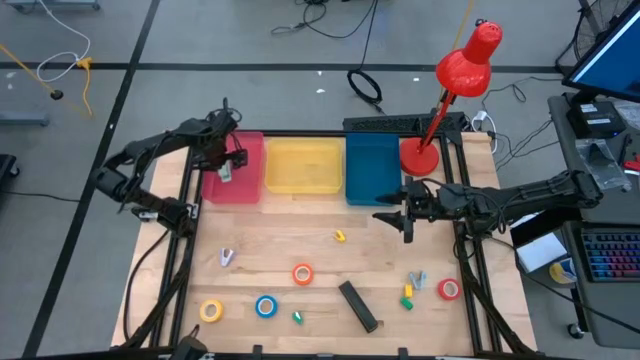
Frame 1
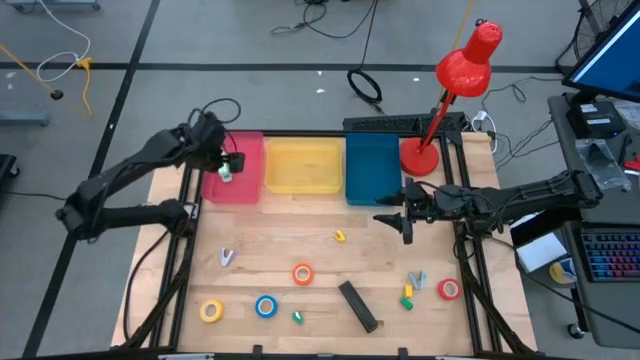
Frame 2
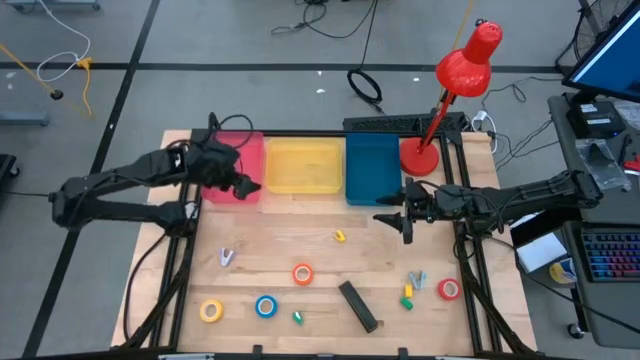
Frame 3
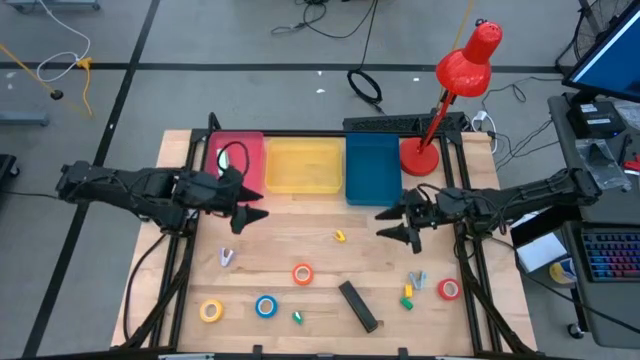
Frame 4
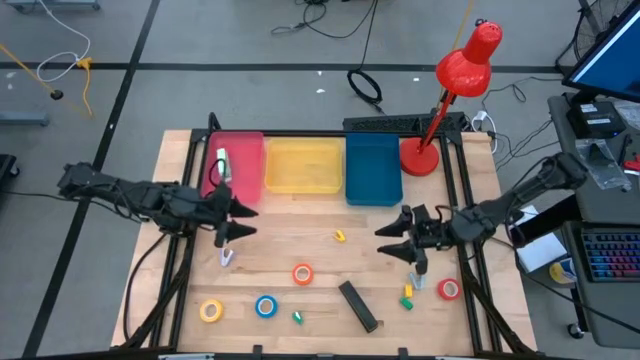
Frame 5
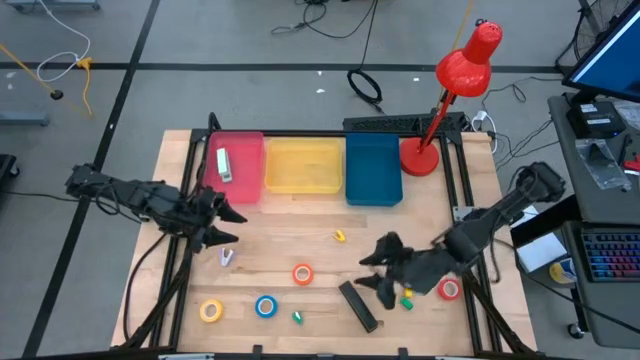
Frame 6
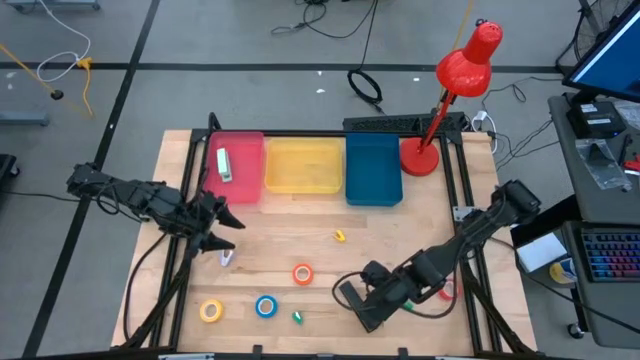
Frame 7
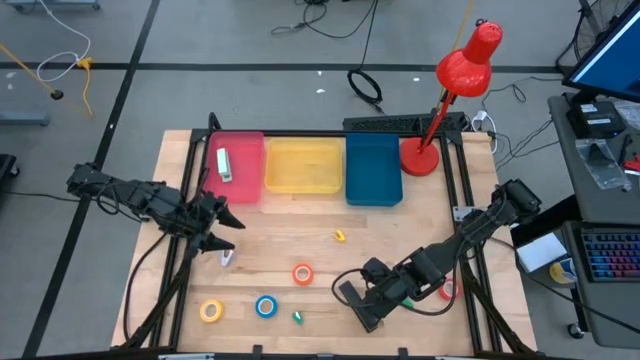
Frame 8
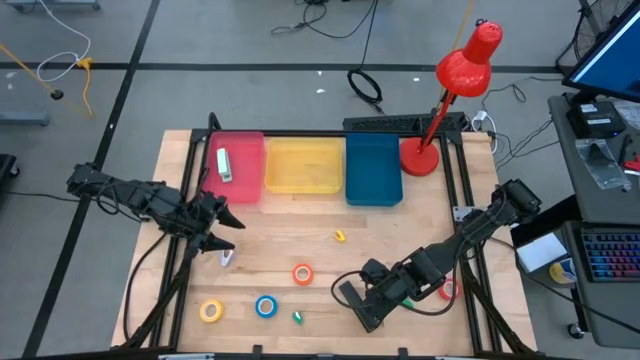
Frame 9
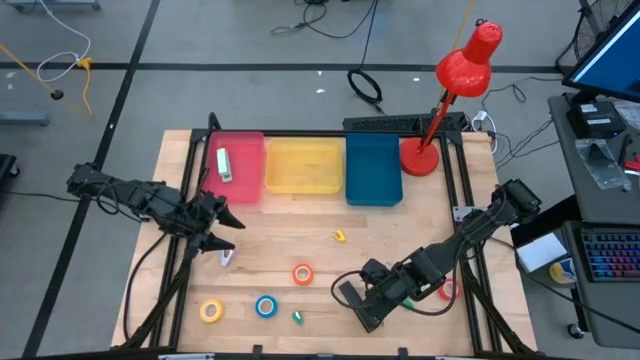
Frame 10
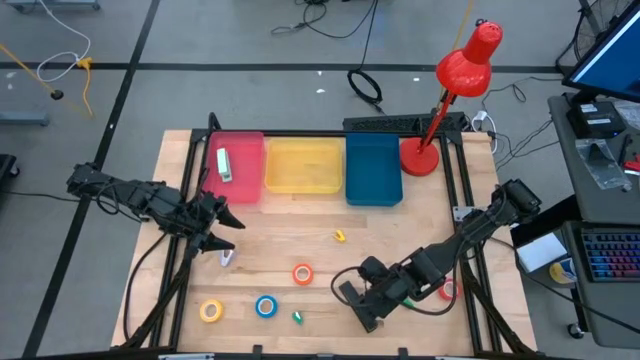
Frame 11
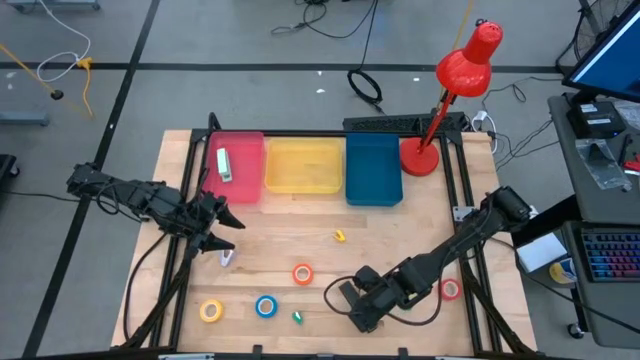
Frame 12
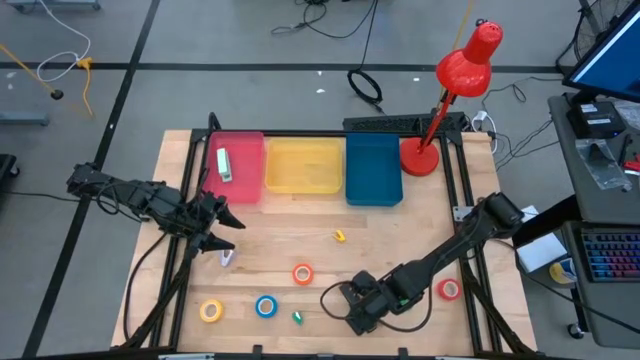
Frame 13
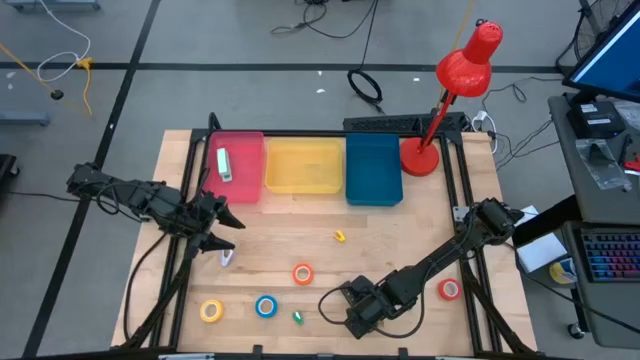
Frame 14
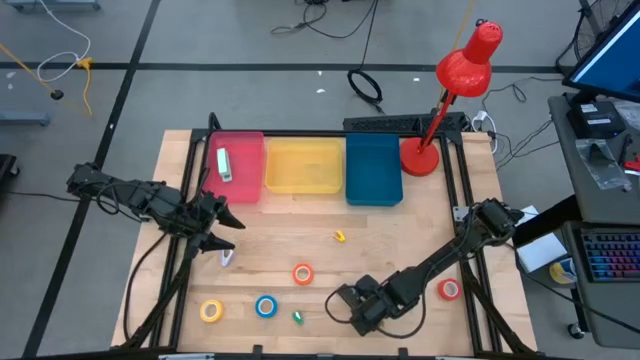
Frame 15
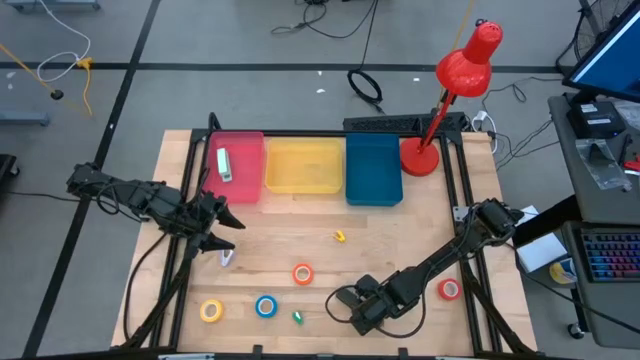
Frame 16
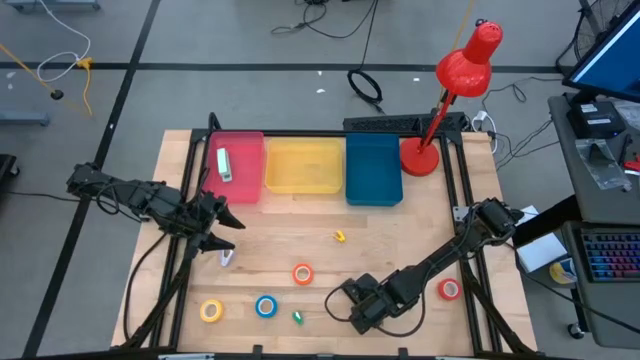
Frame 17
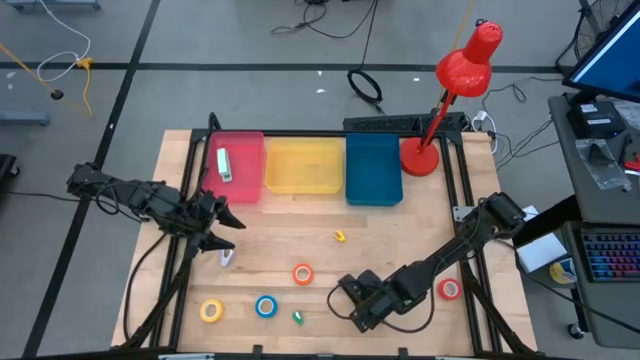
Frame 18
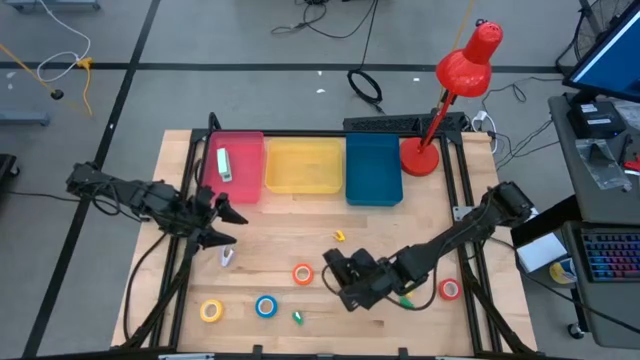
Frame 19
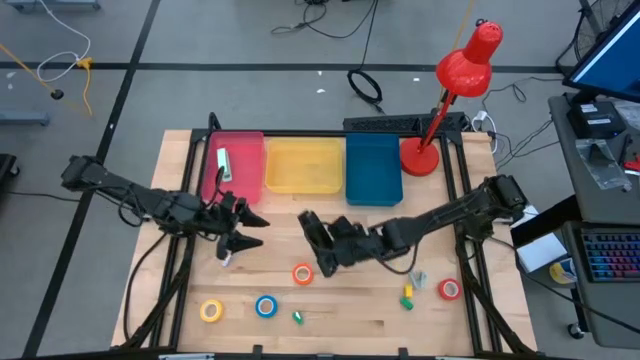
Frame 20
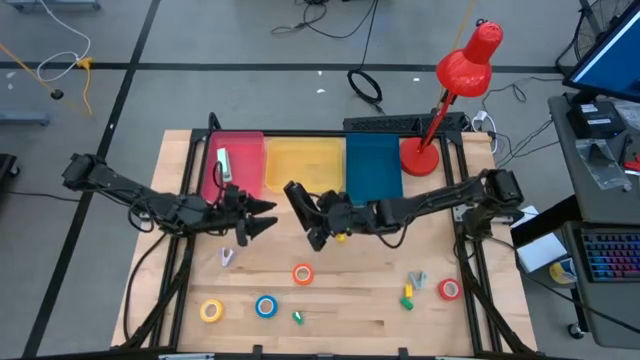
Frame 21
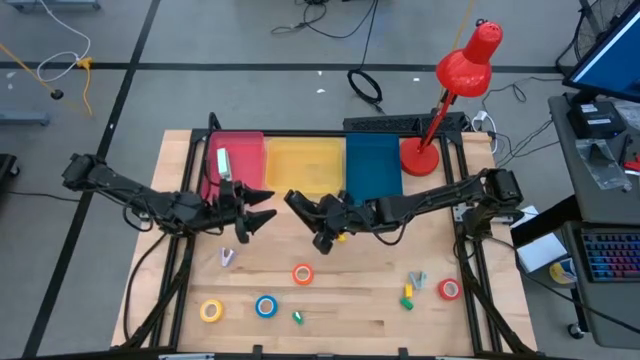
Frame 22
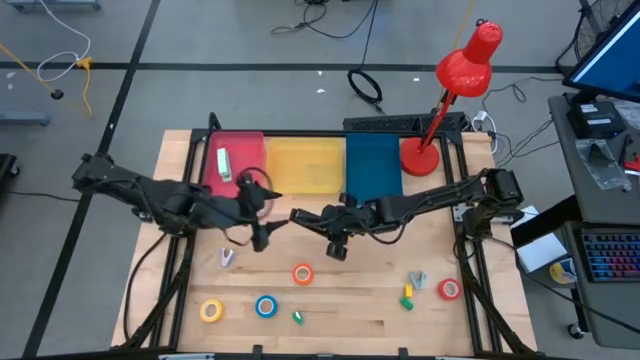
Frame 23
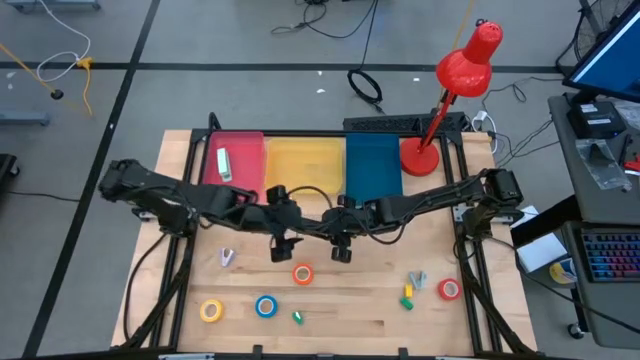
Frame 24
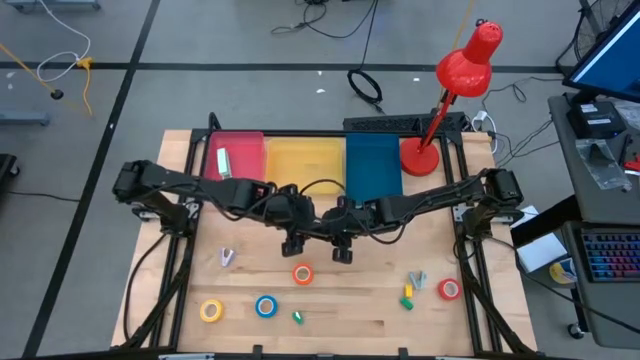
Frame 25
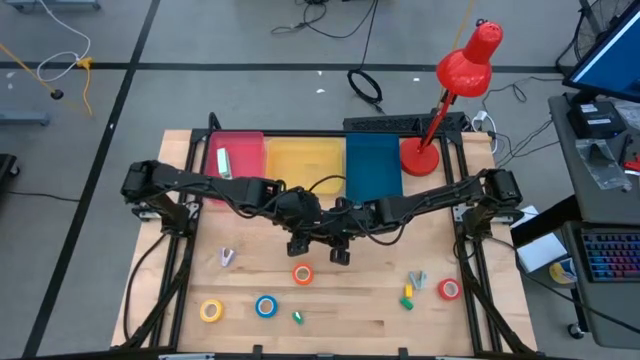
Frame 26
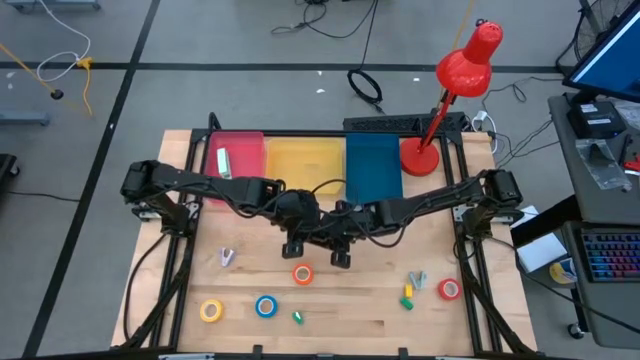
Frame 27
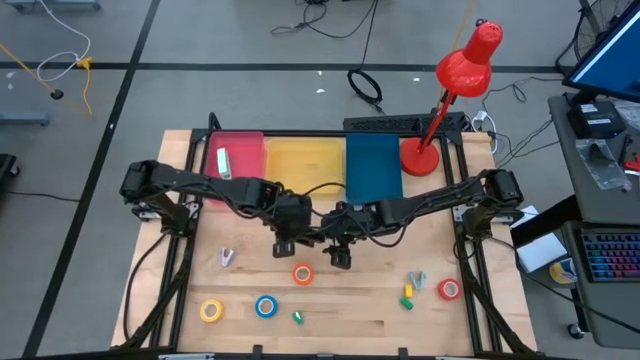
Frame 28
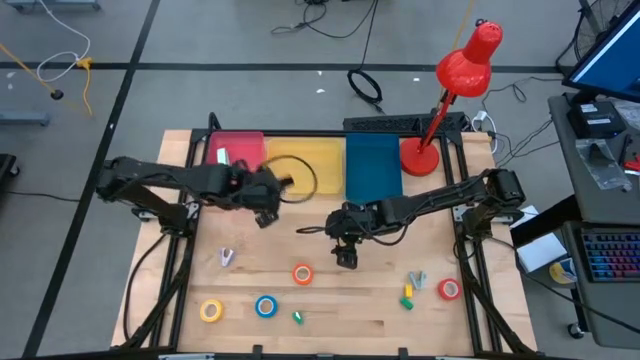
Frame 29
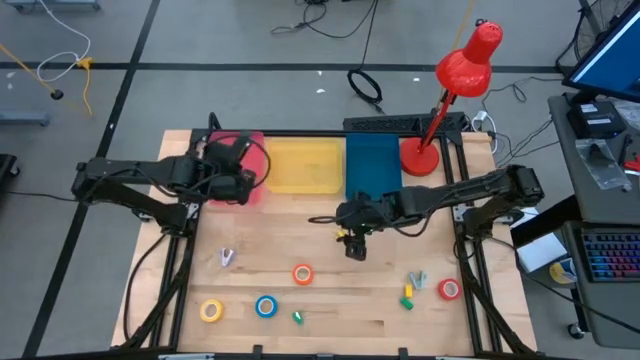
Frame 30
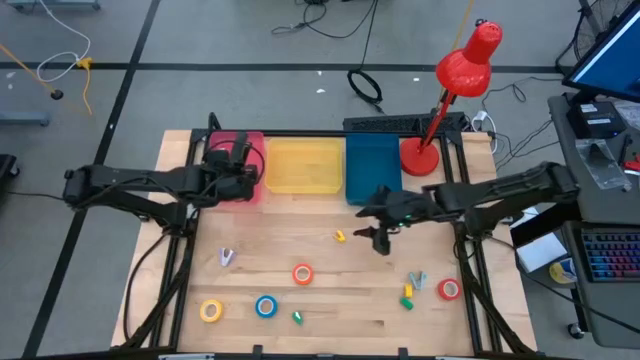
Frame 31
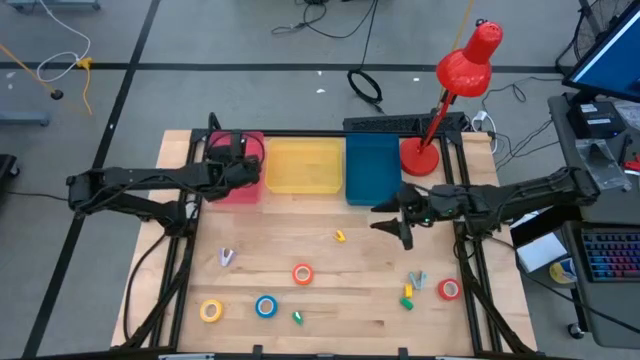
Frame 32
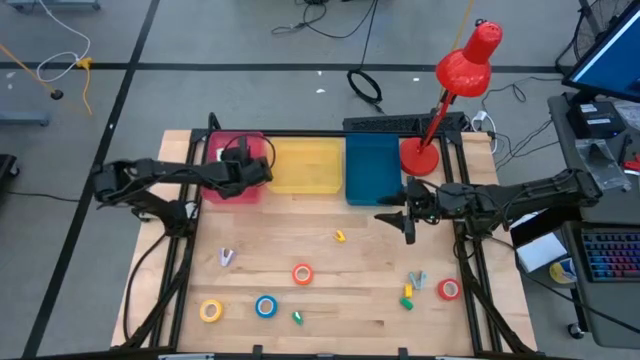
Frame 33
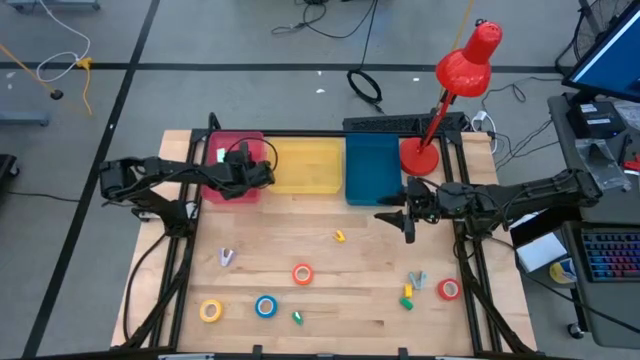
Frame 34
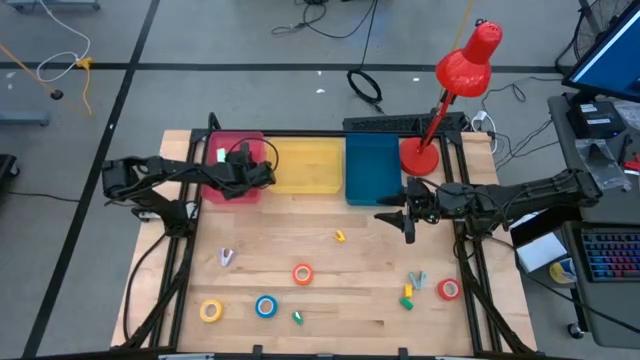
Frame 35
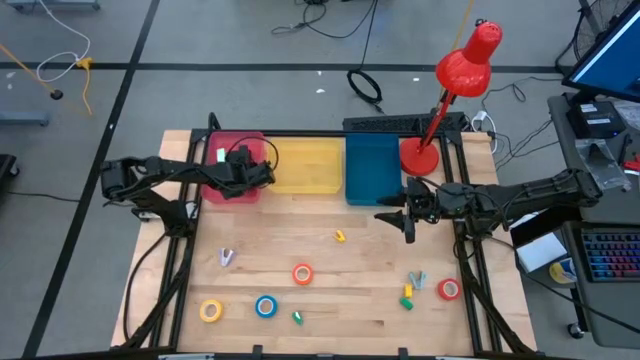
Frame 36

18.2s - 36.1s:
Task: Pick and place Stapler, Stapler remover, tape
Put the black stapler into the red bin

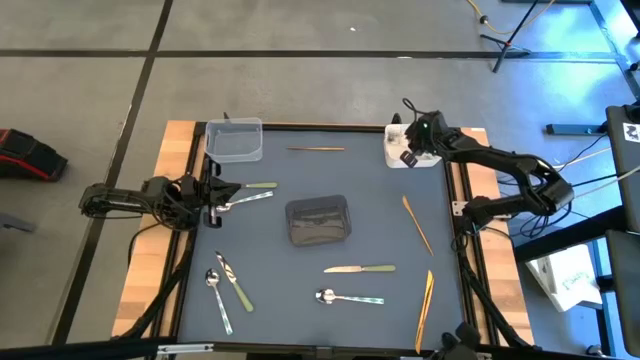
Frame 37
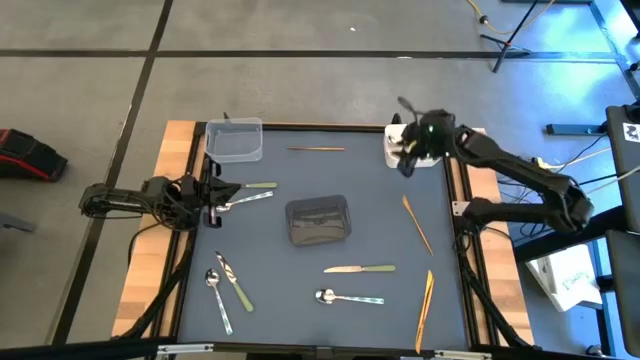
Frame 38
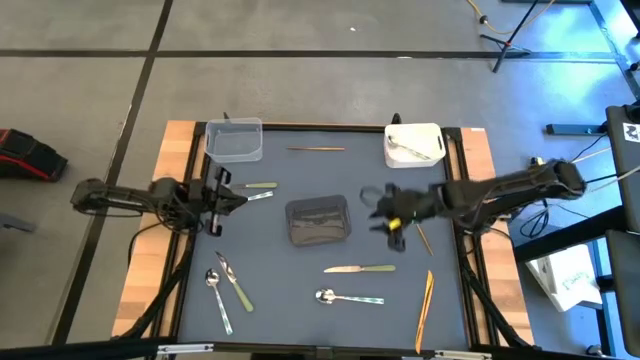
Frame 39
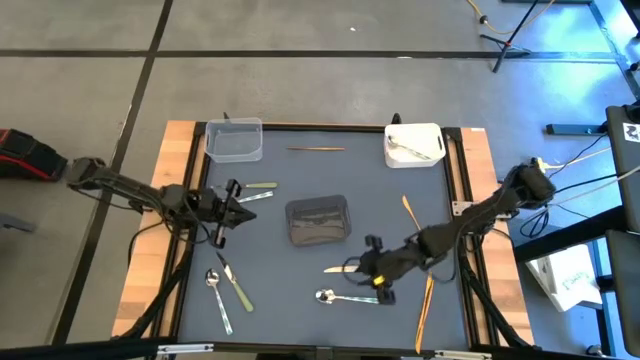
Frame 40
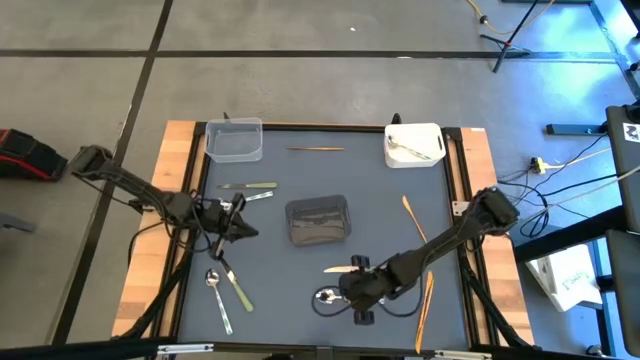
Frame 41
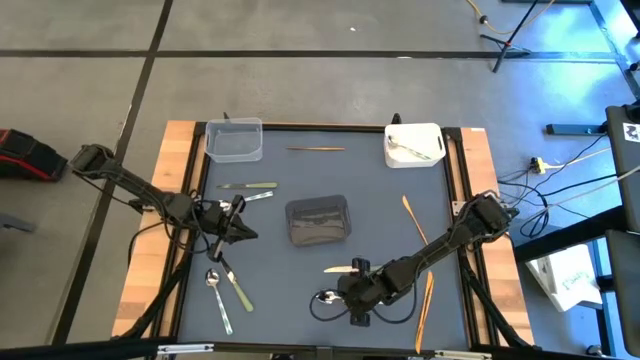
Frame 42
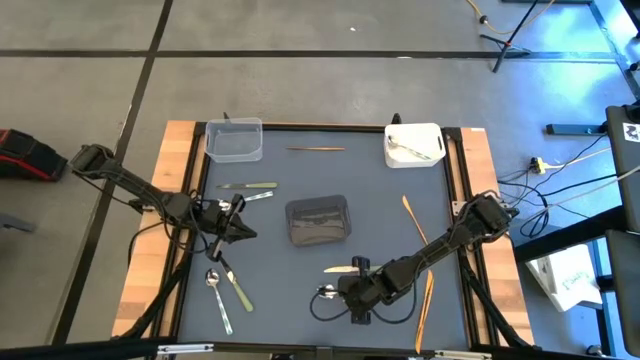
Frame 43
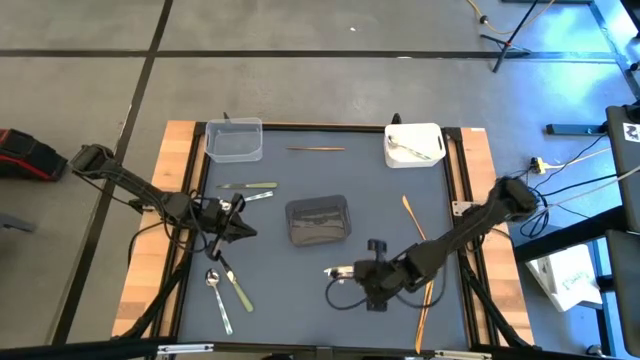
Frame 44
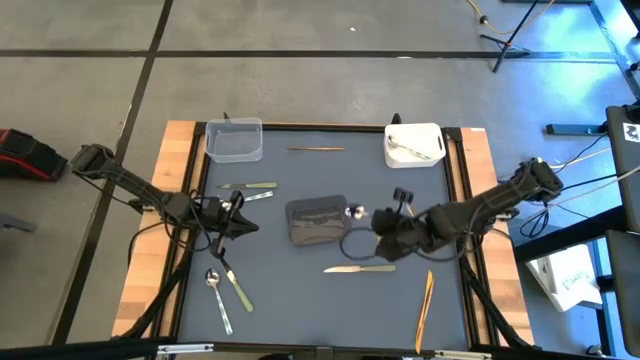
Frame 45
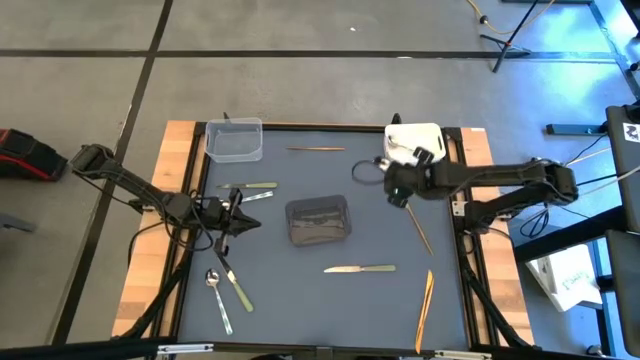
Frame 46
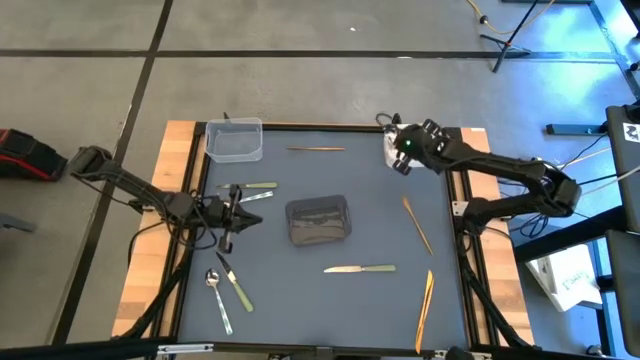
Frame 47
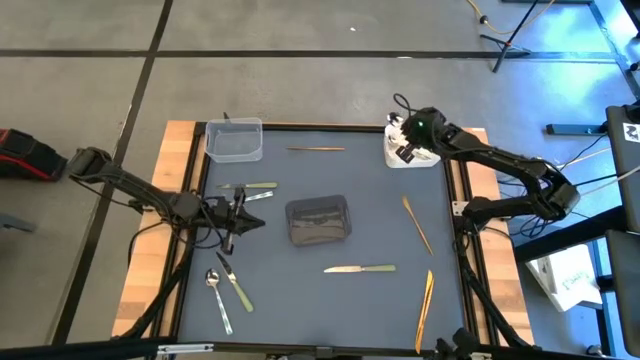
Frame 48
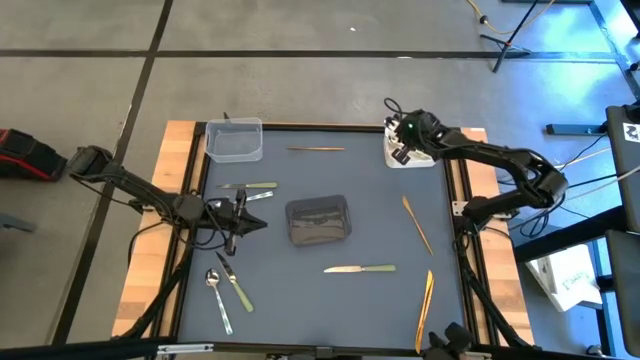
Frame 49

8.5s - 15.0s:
Task: Sort silverware by color (type)
Put the white green spoon into the white bin
